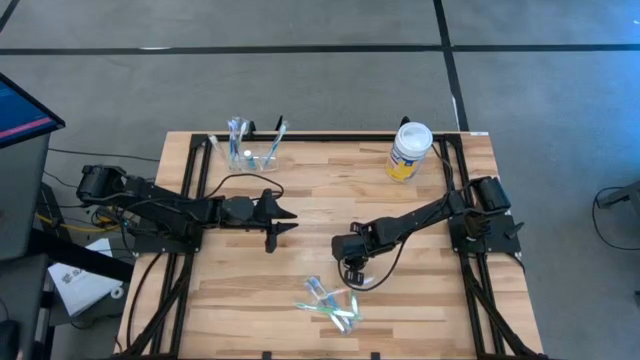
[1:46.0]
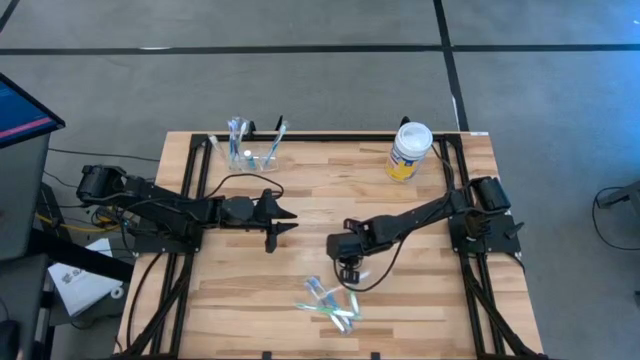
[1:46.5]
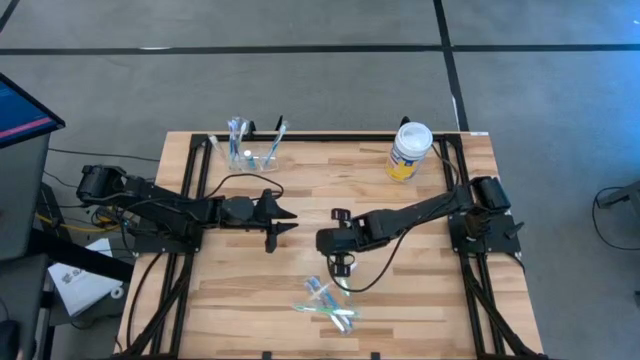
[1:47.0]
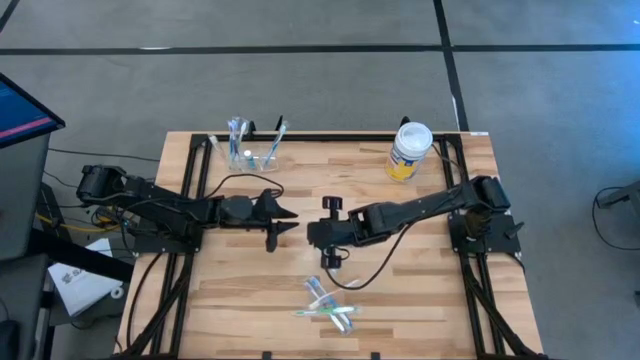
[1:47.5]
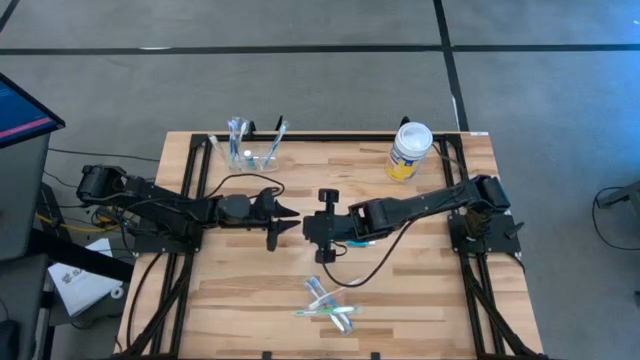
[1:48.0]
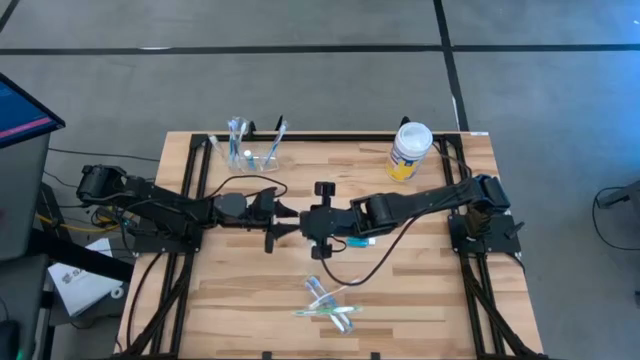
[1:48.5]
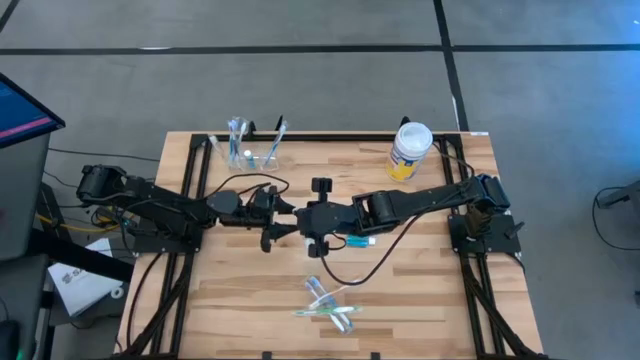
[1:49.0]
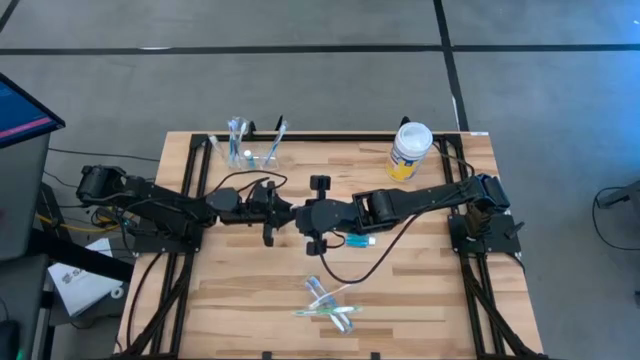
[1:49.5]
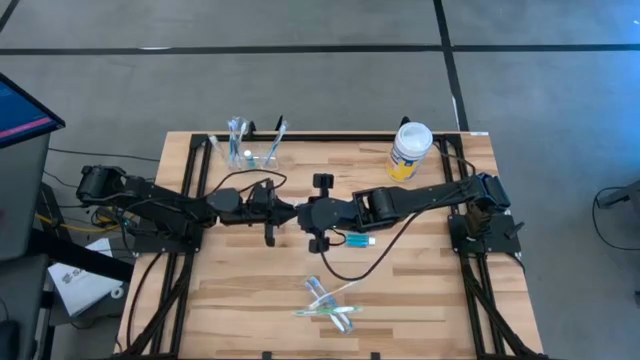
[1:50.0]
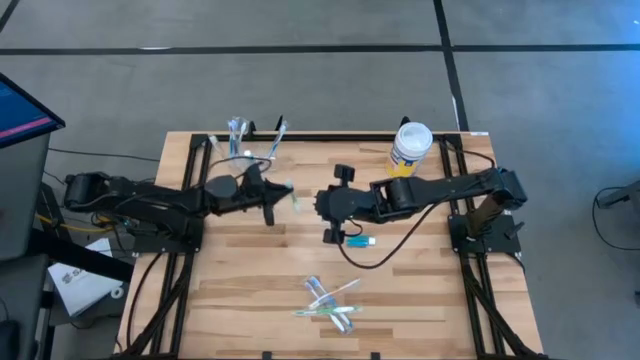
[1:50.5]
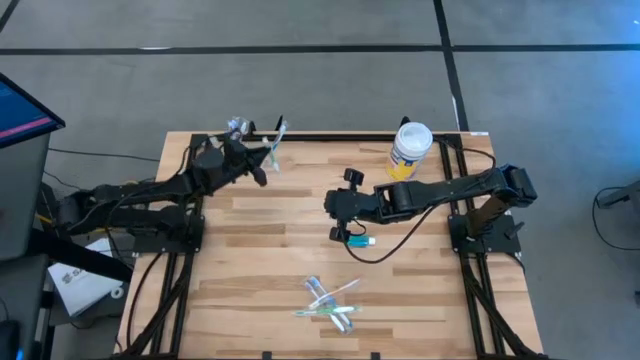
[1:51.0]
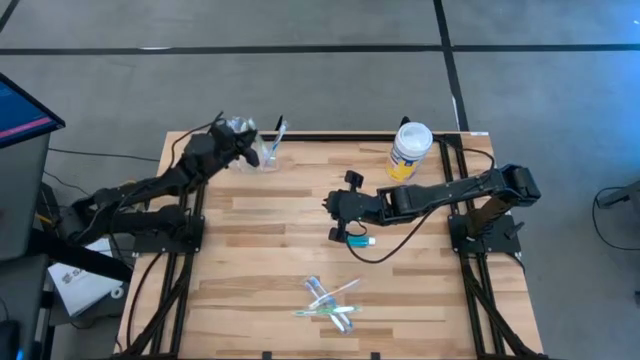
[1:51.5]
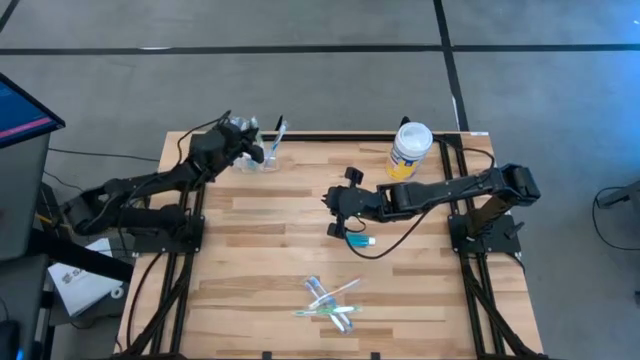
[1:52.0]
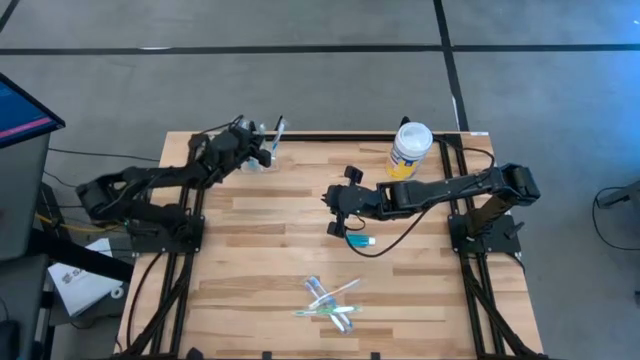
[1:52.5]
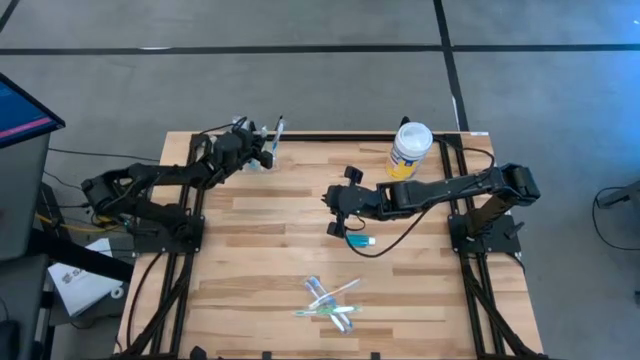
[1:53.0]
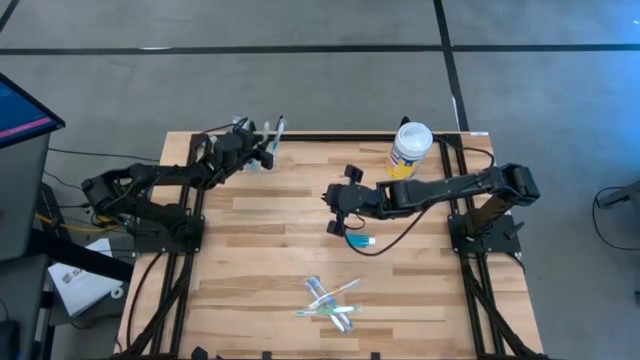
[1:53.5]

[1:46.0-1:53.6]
Task: Pick & Place toothbrushing station
Put the green toothbrush into the transparent organizer

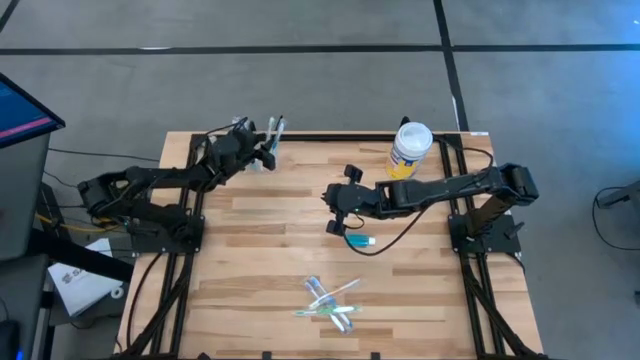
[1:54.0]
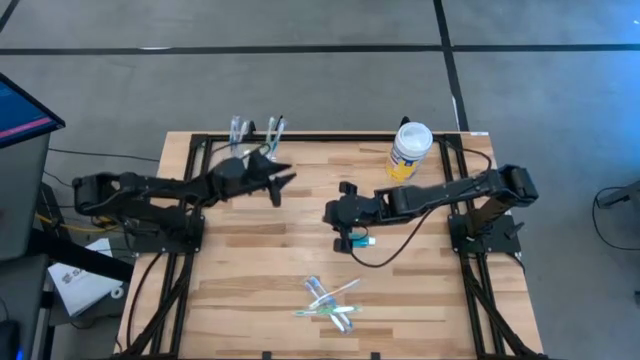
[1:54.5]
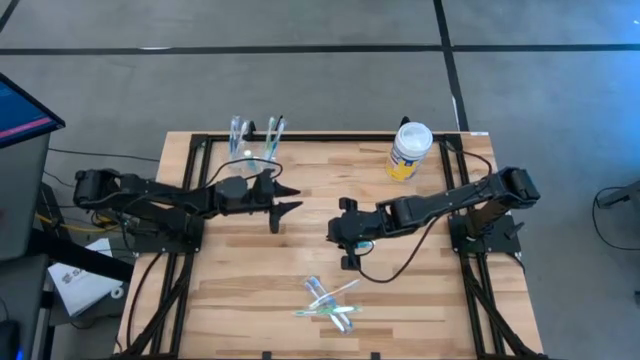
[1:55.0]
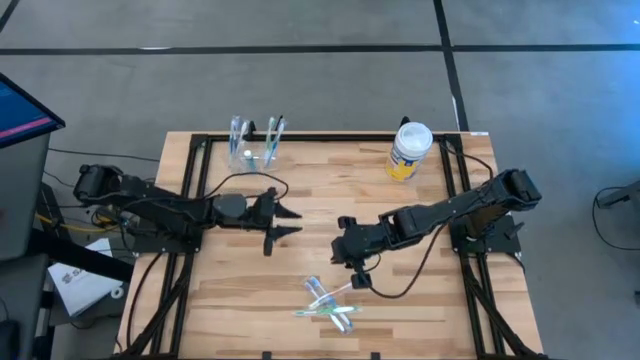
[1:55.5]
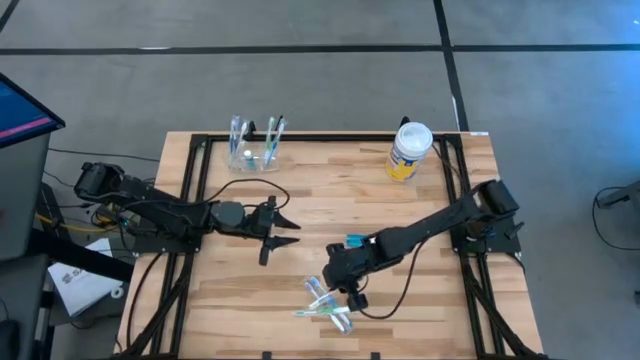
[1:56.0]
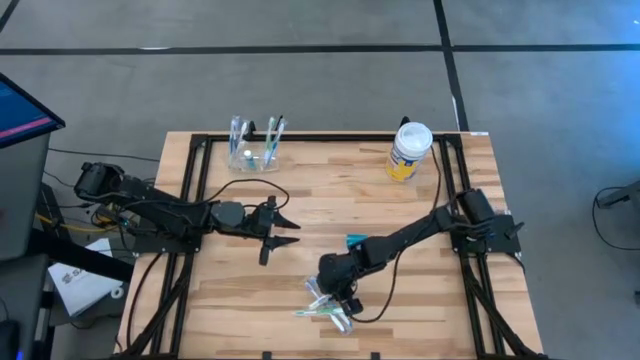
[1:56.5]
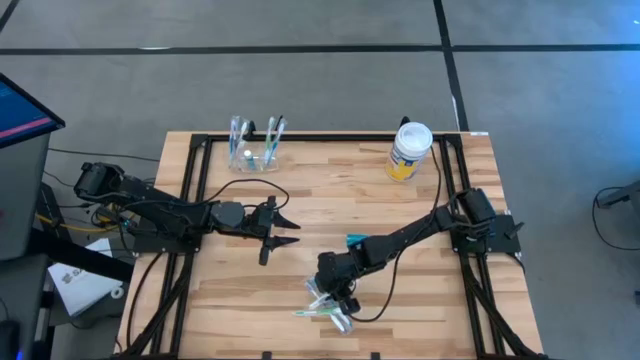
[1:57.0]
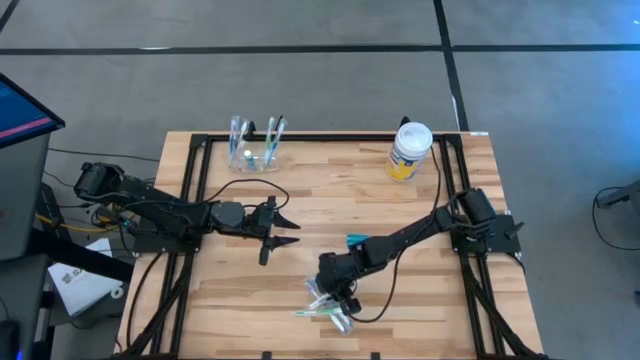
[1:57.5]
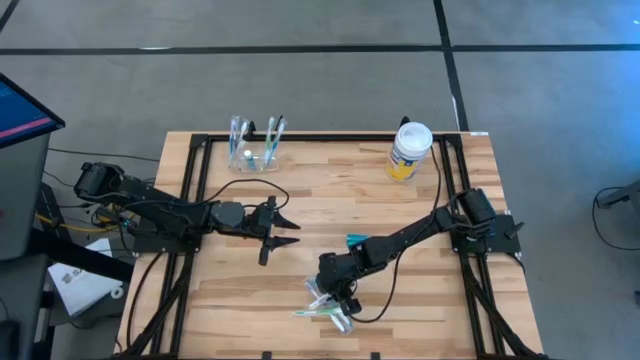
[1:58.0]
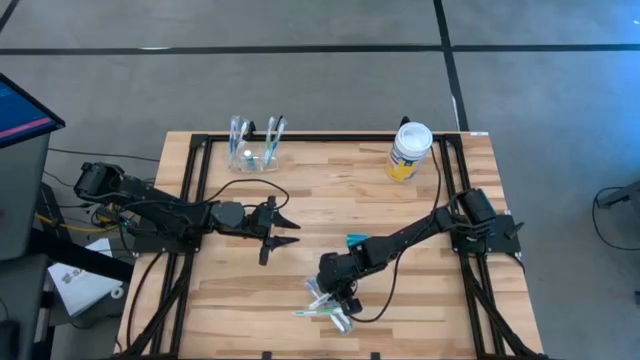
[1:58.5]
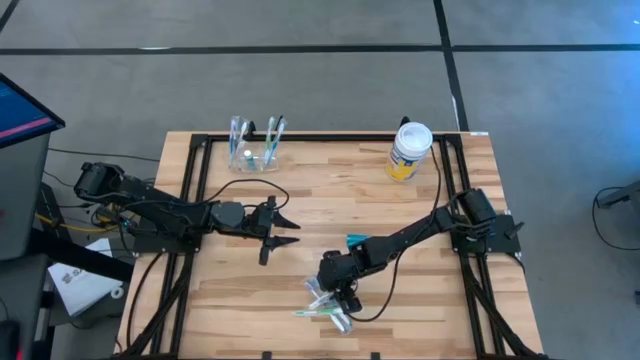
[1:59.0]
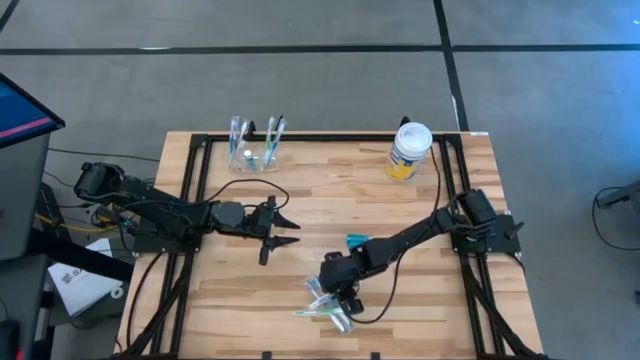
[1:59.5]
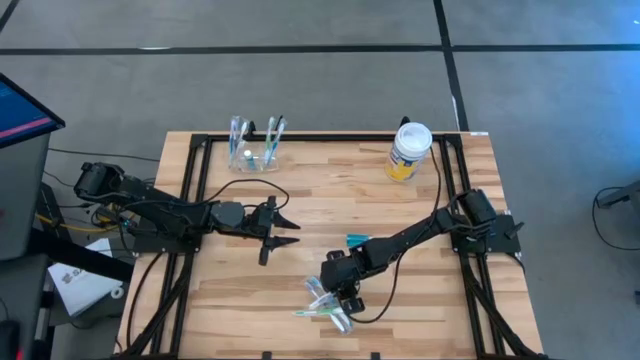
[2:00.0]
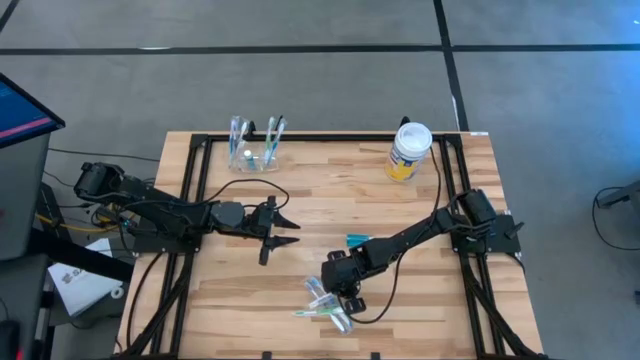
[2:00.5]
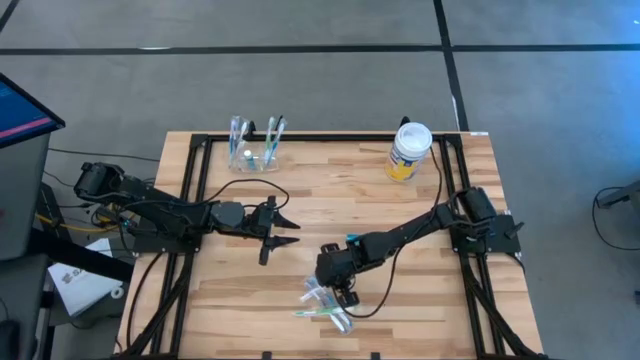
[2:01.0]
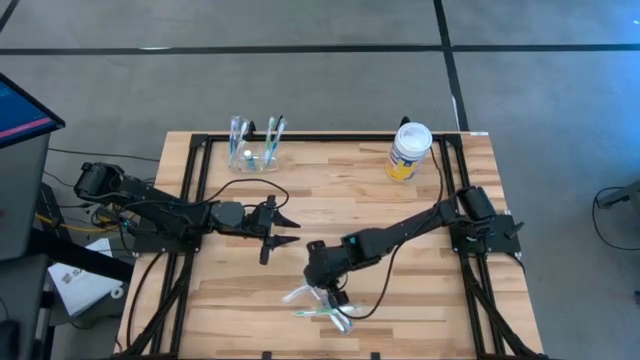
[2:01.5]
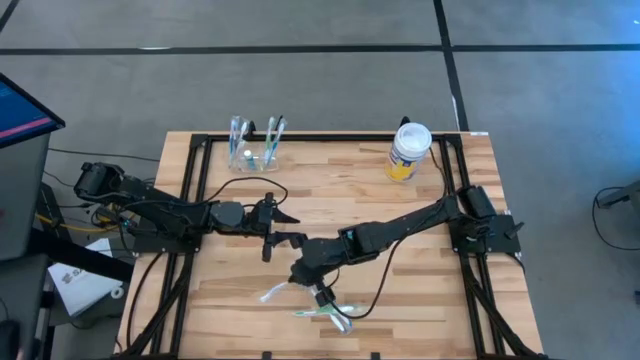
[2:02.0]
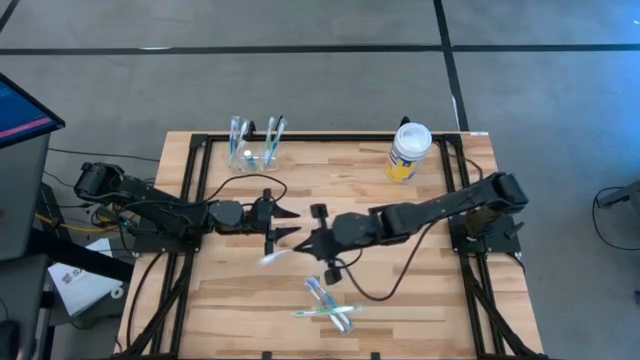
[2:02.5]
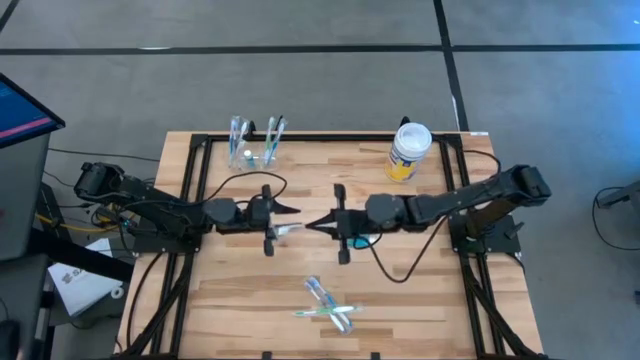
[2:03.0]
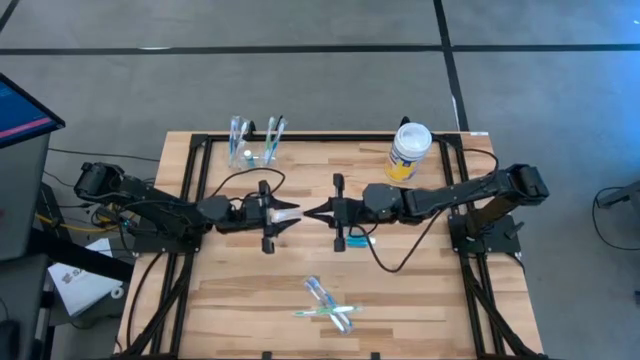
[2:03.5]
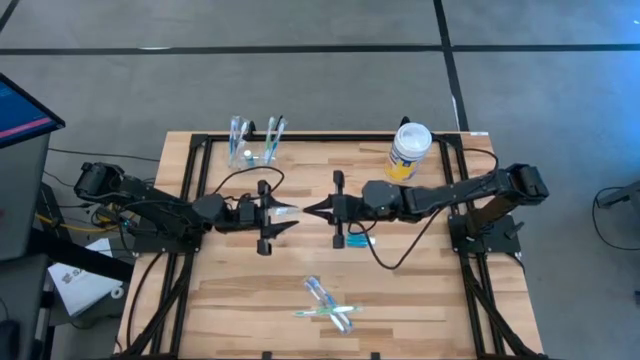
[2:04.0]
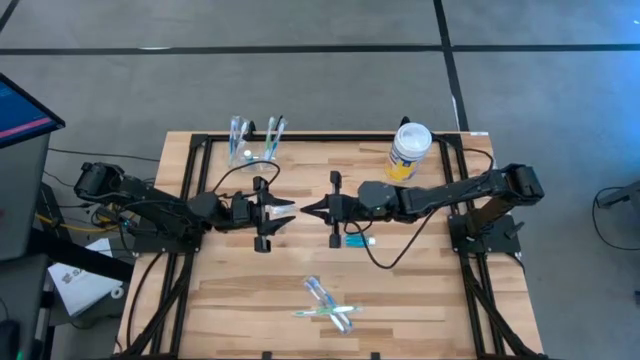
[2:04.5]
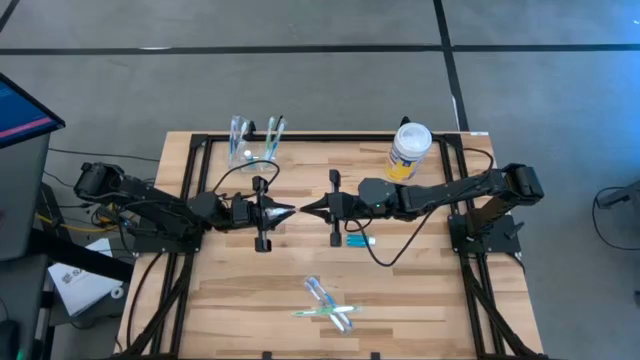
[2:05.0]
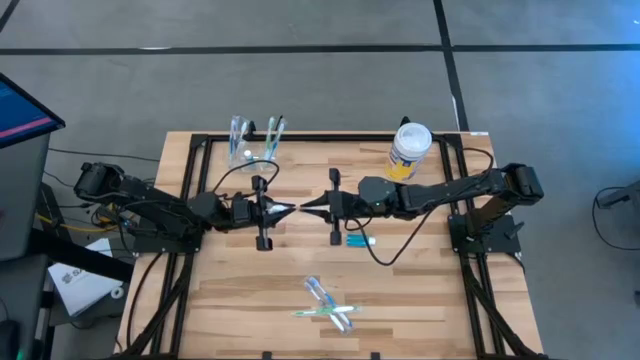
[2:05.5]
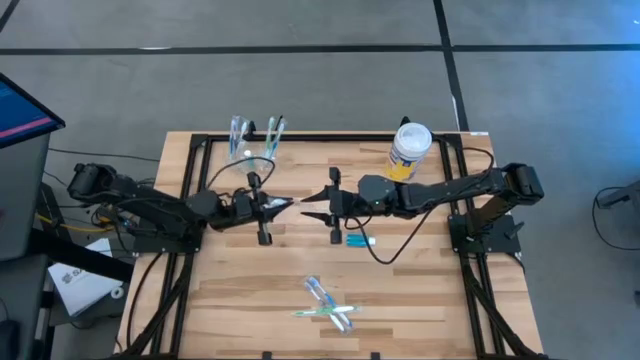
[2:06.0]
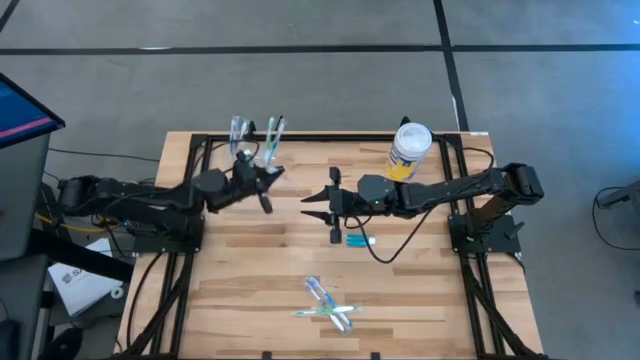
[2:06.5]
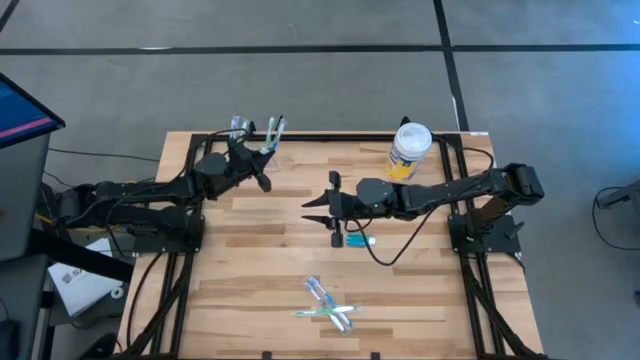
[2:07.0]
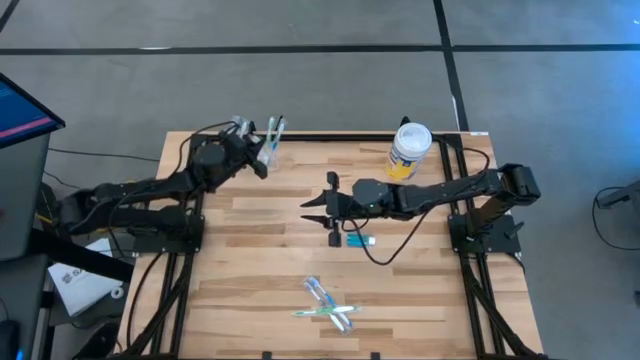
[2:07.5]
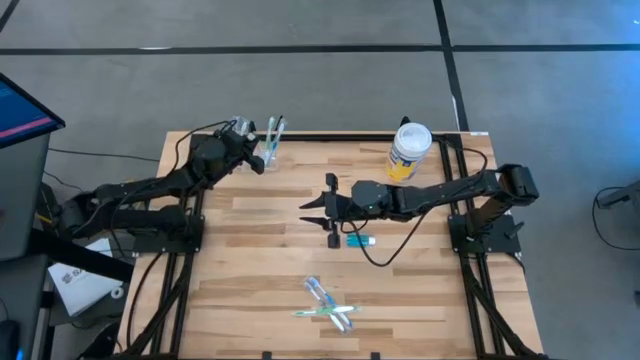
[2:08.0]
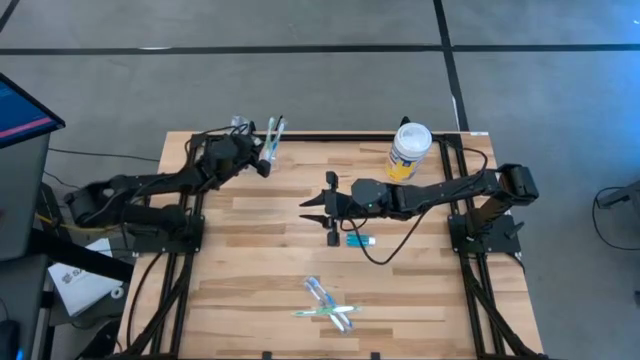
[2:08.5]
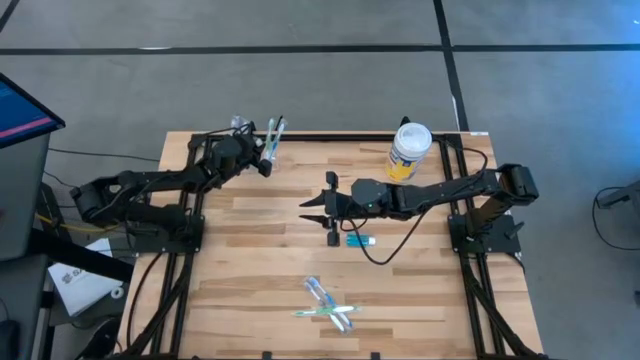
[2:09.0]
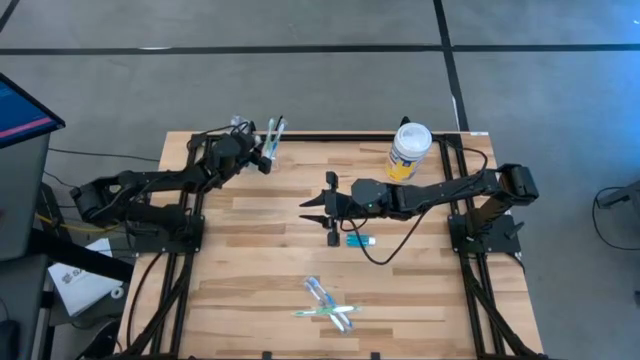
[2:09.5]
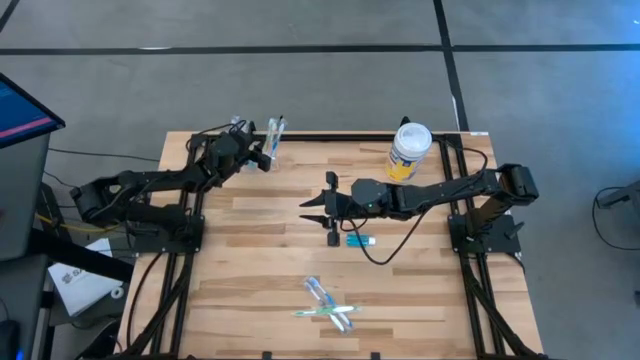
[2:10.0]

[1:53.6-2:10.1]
Put the orange toothbrush into the transparent organizer
